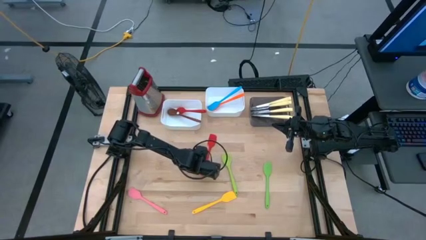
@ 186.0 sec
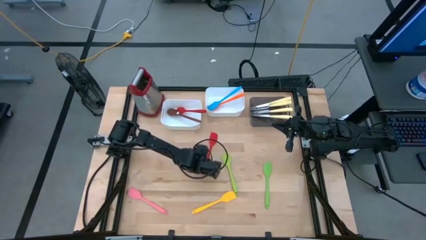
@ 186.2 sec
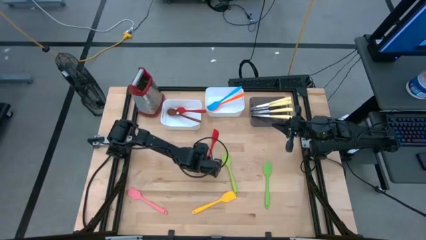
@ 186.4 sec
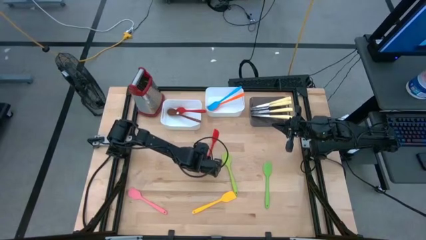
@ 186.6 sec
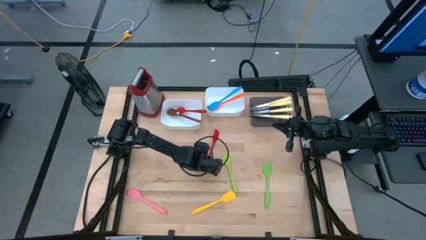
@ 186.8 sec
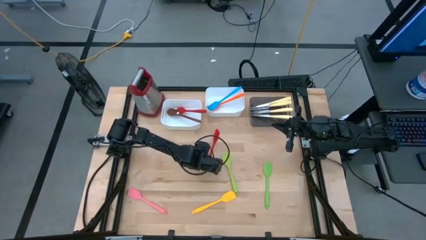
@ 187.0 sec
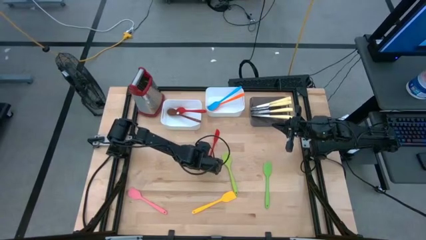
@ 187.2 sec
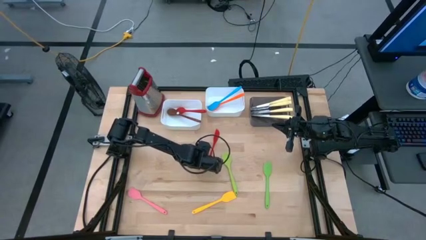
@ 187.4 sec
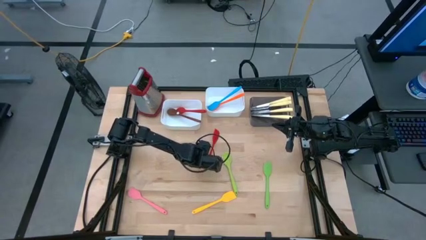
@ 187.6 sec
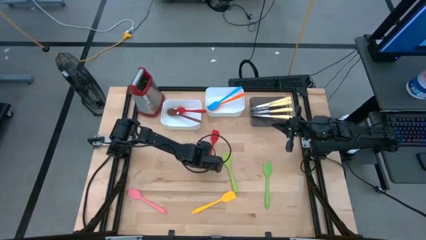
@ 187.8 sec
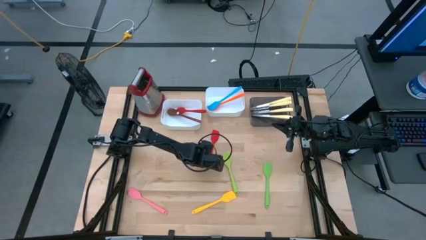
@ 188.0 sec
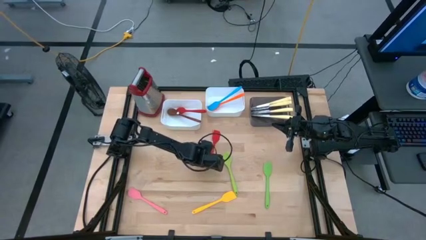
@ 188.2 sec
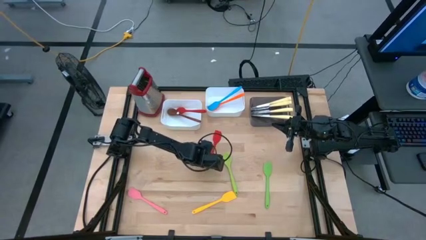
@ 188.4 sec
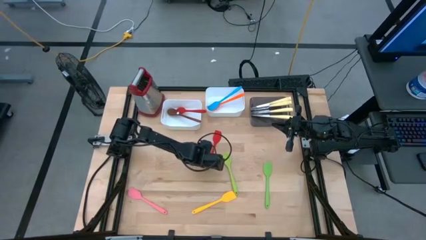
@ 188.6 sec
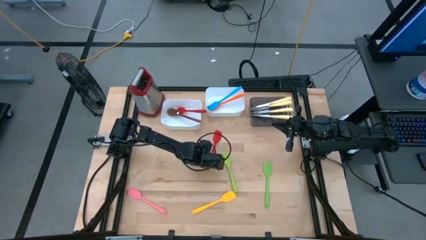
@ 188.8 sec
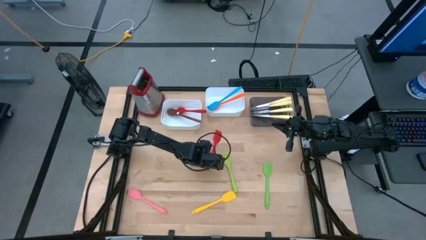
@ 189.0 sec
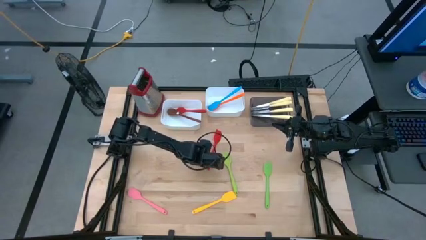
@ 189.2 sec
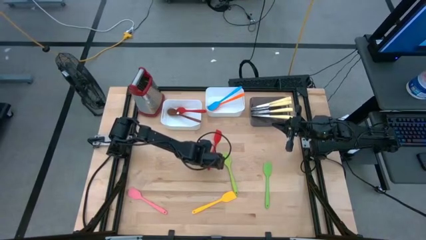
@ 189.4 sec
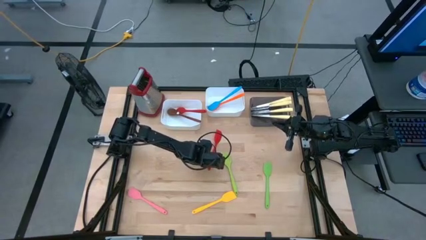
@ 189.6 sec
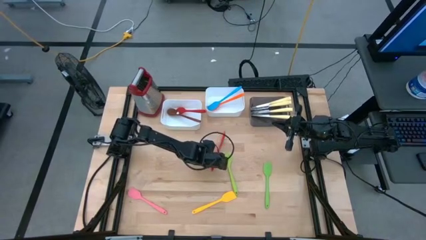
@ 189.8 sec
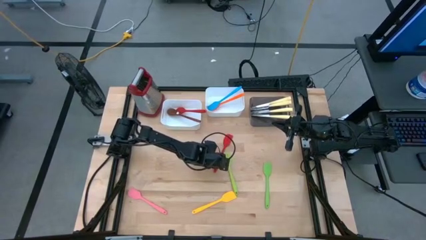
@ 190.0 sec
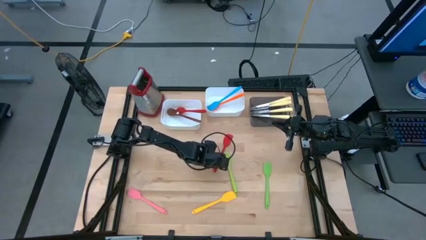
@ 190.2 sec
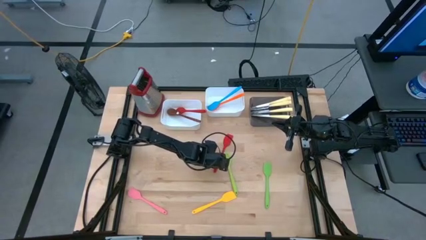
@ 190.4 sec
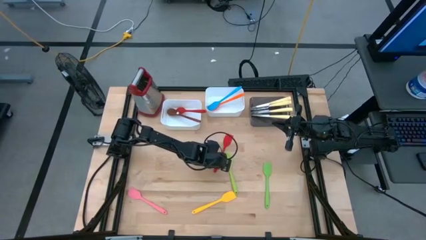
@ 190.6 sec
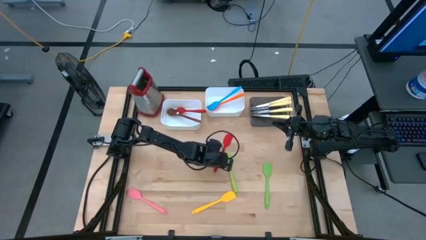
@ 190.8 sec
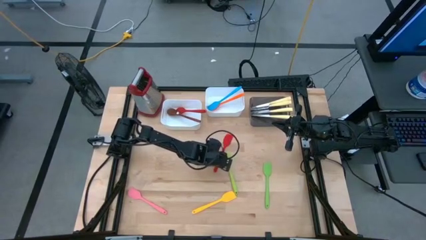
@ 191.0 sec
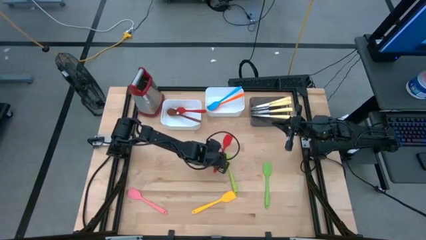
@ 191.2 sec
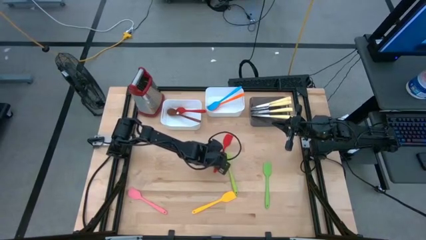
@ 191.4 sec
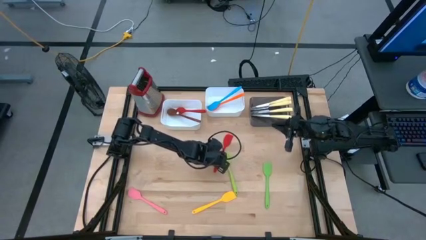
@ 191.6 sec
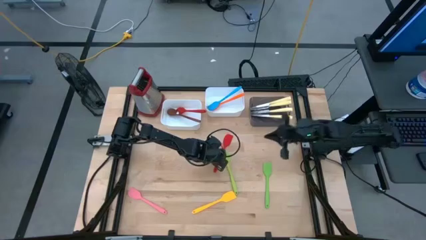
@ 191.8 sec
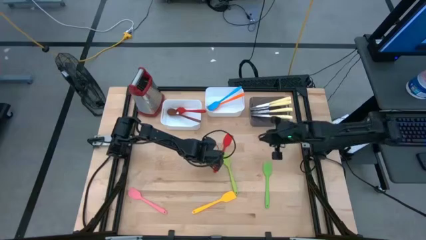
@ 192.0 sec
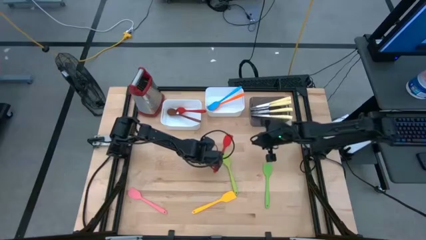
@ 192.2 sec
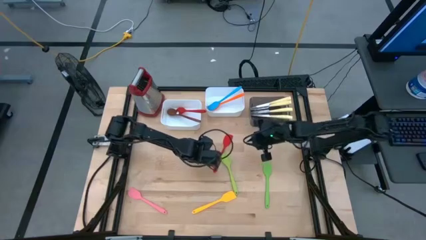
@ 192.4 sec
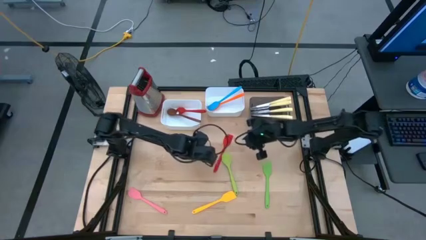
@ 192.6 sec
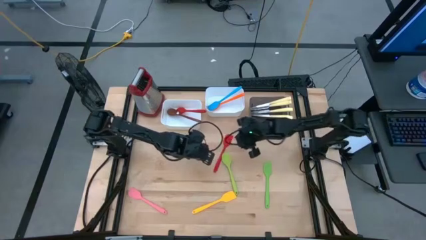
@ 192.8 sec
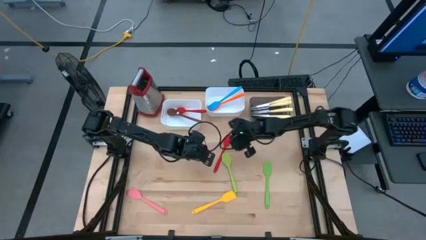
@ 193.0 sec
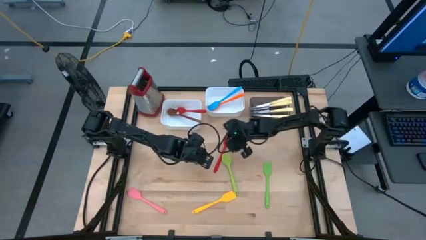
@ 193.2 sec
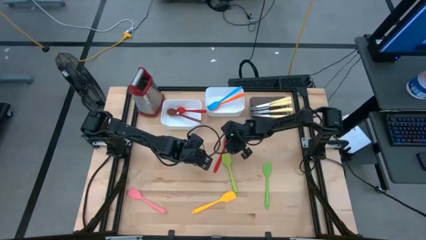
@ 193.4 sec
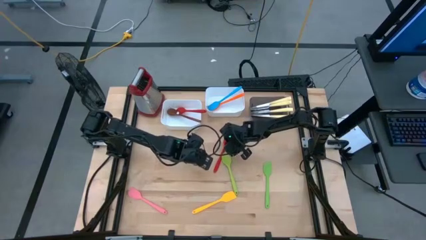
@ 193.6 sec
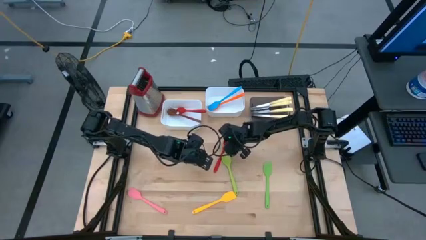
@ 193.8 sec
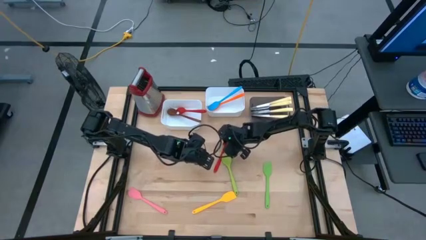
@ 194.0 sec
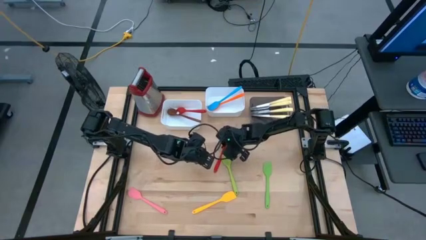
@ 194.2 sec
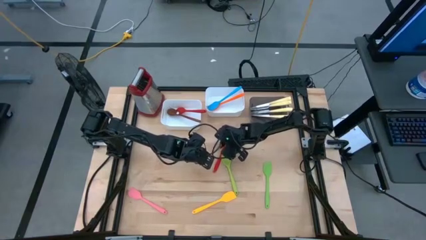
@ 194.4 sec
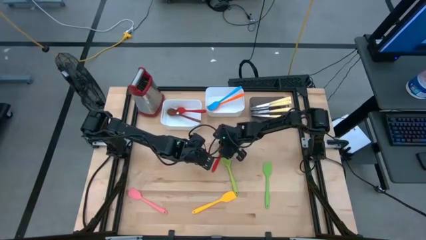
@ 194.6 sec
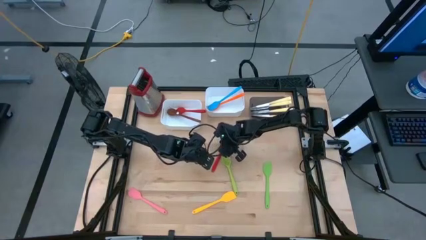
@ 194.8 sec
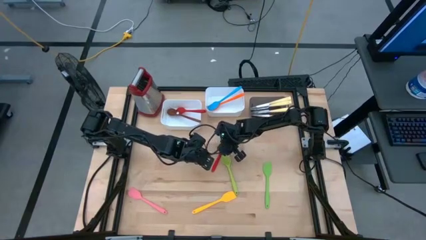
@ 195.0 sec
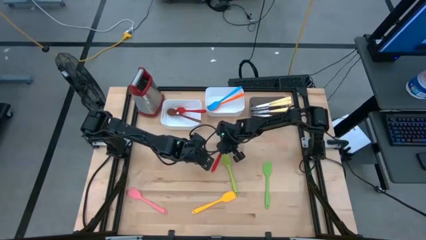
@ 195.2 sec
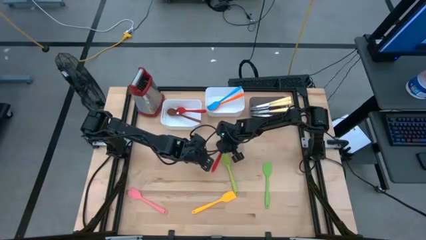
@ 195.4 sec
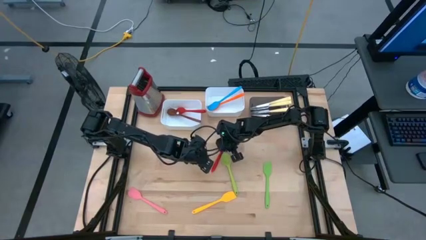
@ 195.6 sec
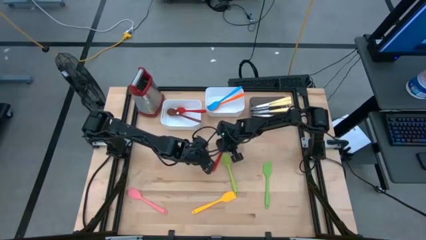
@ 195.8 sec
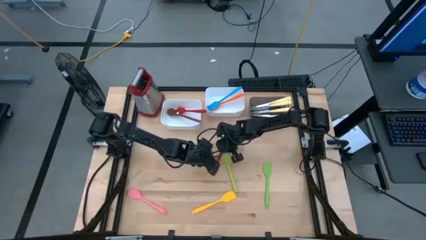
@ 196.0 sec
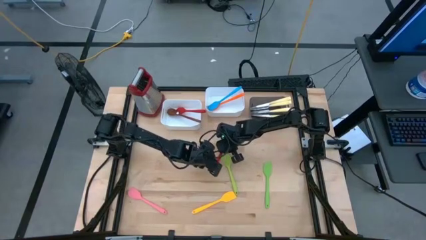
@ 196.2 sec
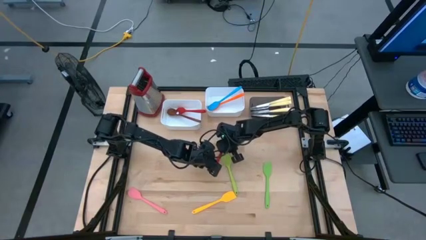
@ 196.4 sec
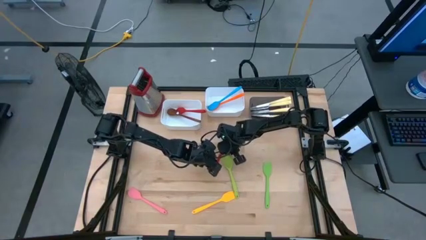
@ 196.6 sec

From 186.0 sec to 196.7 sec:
Task: Pick & Place Kitchen Items
Put the red spatula into the right white bin
